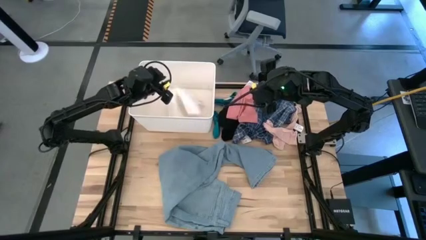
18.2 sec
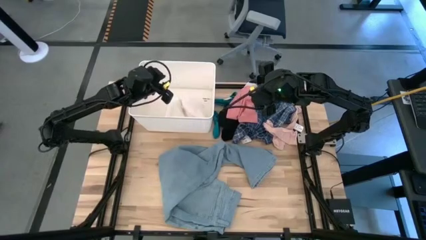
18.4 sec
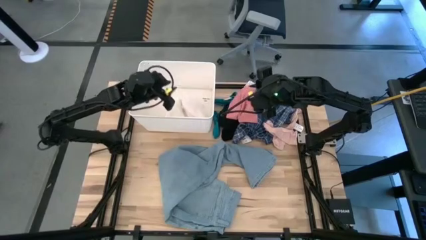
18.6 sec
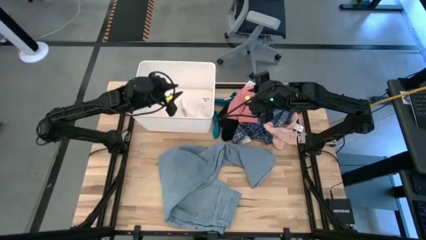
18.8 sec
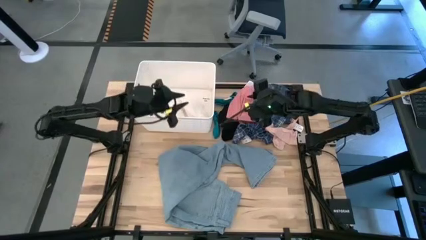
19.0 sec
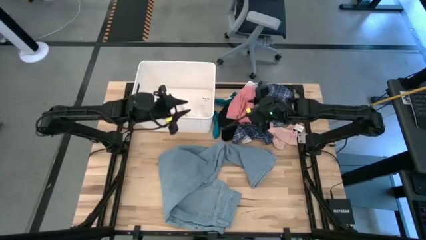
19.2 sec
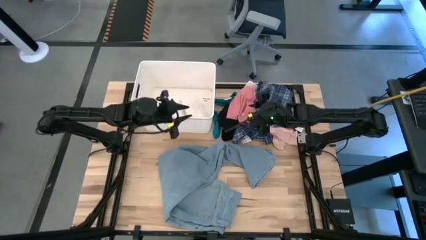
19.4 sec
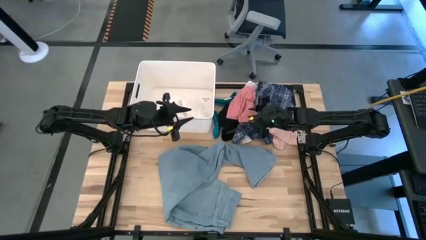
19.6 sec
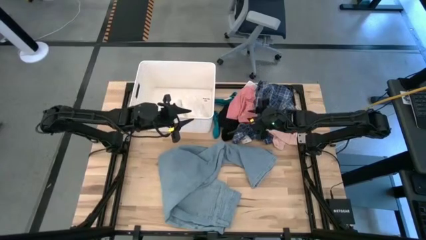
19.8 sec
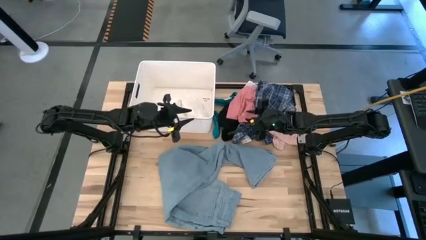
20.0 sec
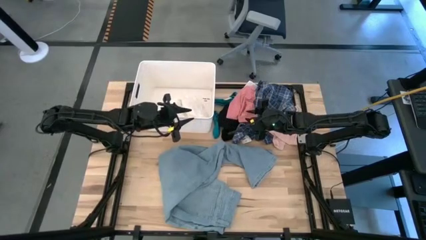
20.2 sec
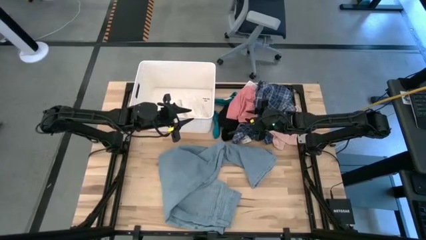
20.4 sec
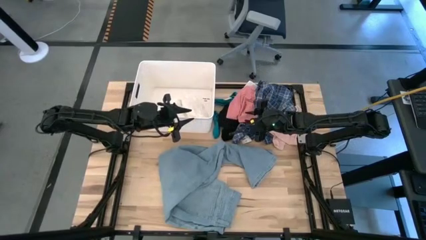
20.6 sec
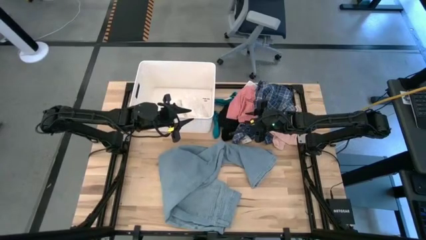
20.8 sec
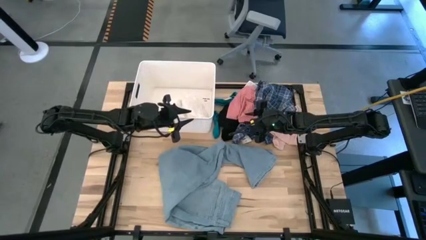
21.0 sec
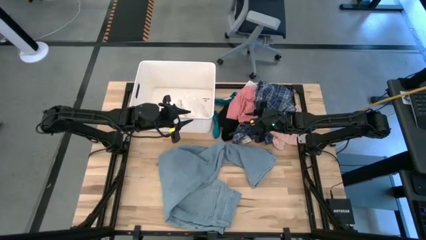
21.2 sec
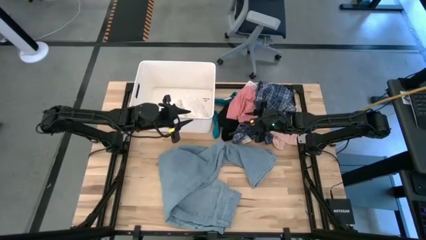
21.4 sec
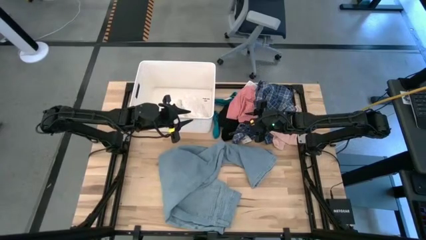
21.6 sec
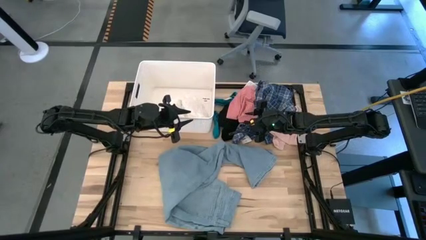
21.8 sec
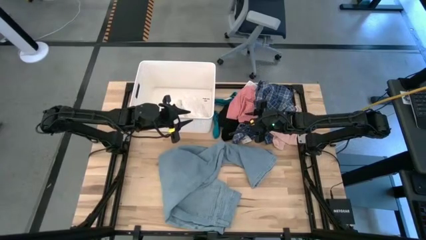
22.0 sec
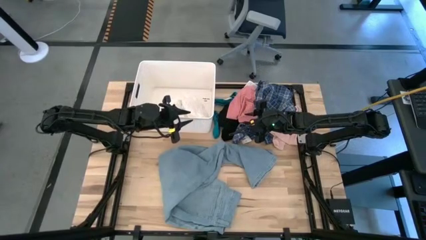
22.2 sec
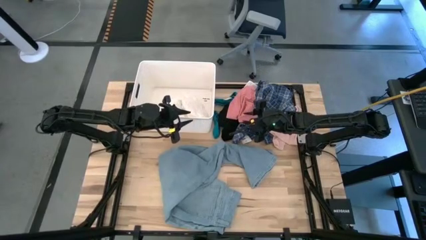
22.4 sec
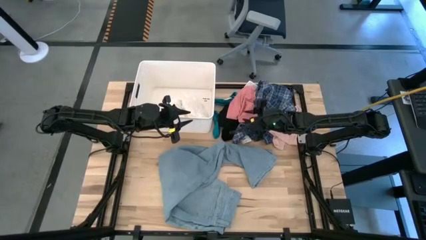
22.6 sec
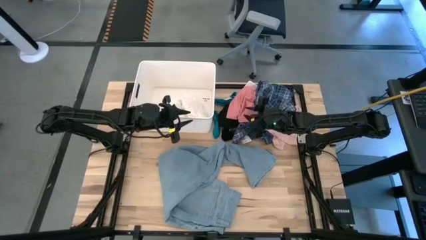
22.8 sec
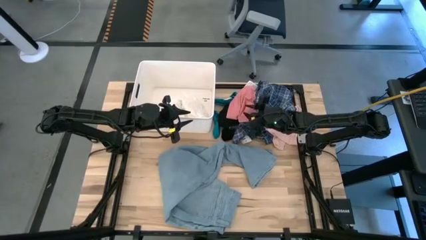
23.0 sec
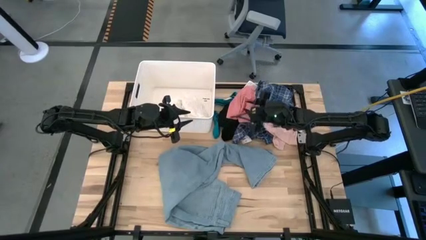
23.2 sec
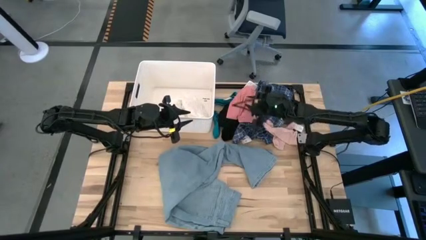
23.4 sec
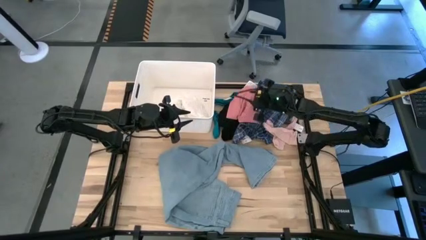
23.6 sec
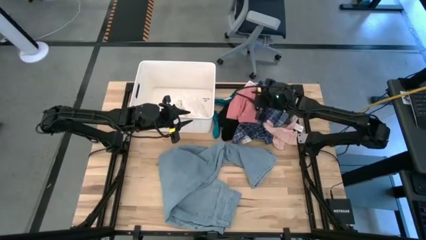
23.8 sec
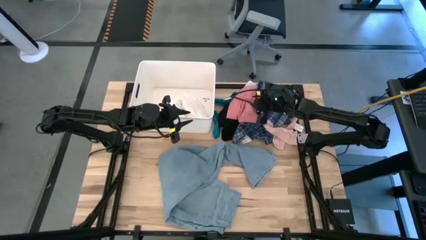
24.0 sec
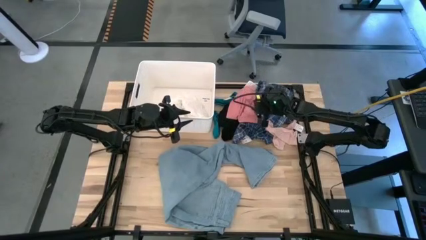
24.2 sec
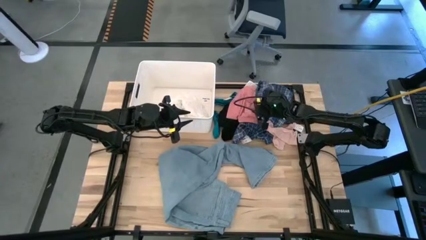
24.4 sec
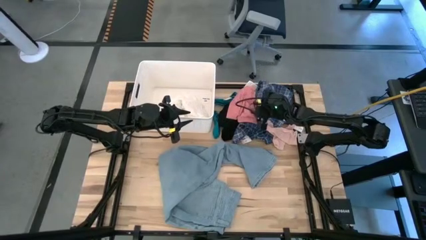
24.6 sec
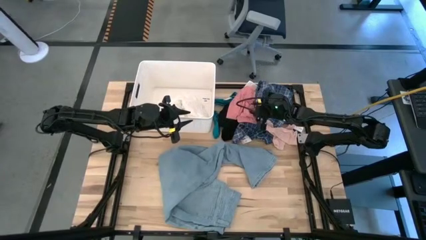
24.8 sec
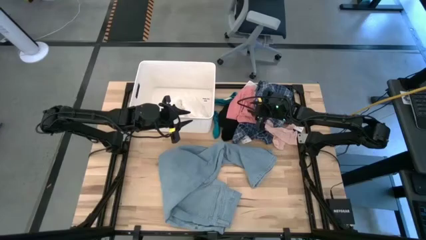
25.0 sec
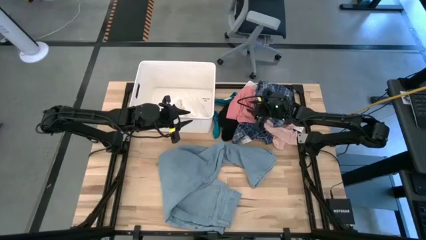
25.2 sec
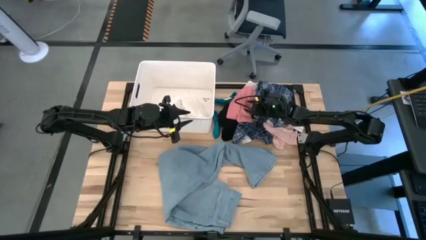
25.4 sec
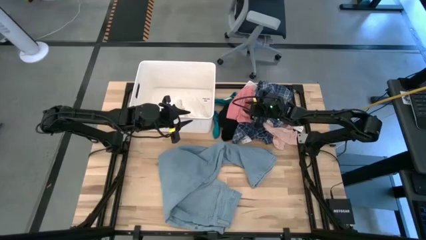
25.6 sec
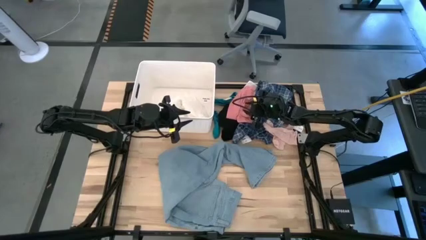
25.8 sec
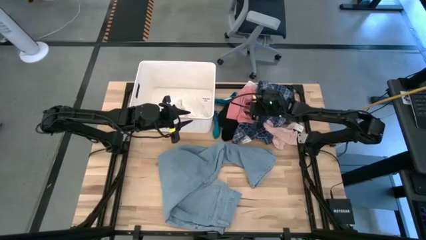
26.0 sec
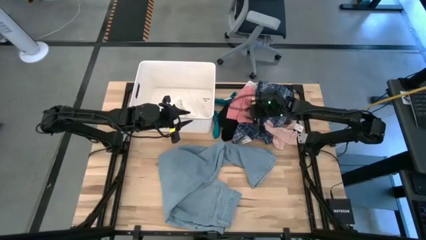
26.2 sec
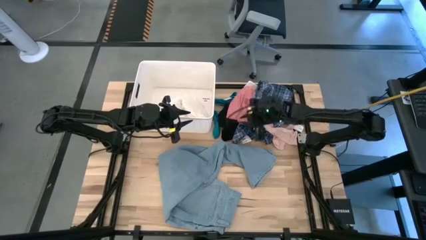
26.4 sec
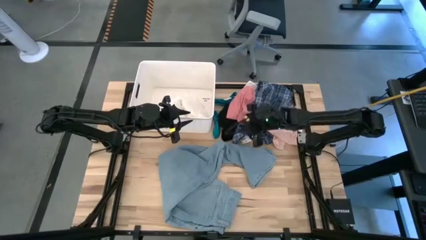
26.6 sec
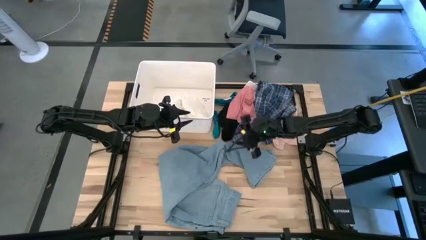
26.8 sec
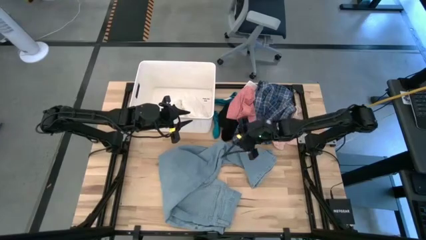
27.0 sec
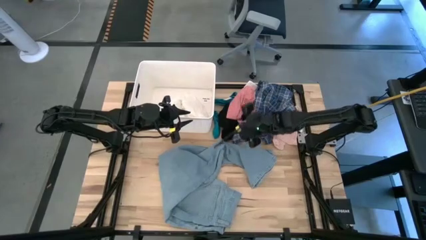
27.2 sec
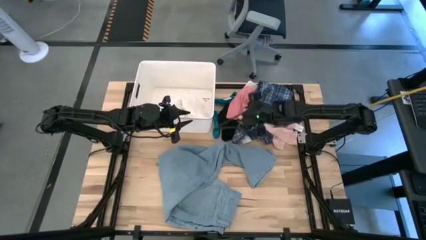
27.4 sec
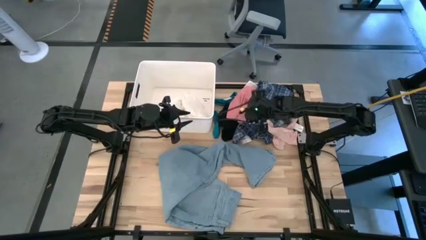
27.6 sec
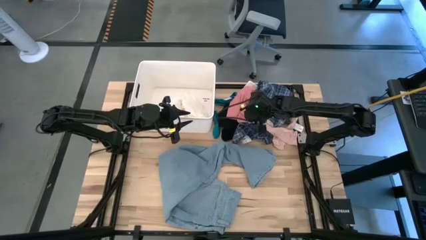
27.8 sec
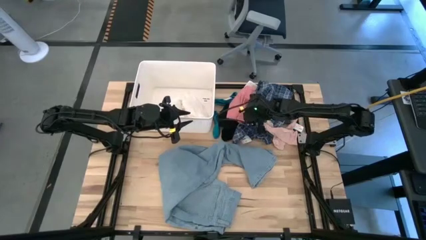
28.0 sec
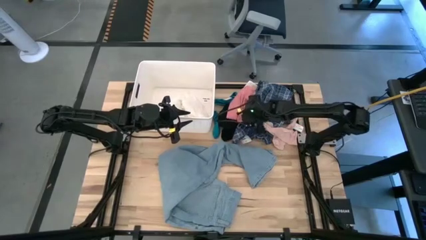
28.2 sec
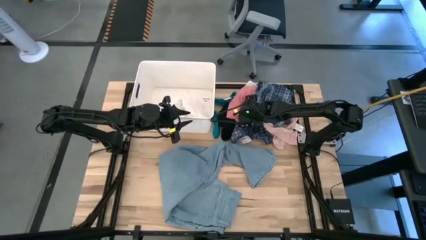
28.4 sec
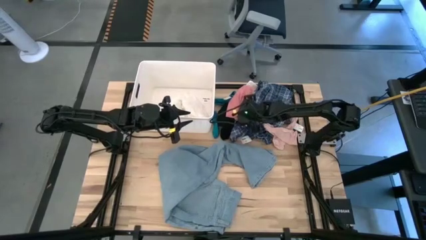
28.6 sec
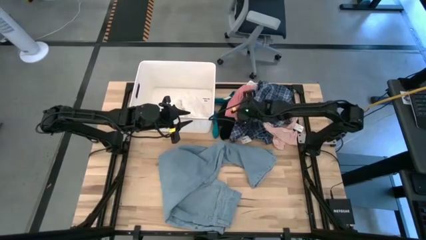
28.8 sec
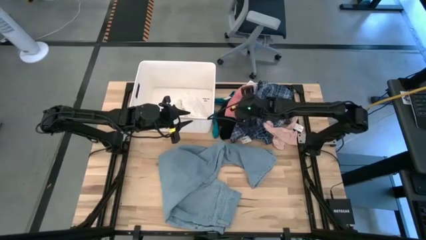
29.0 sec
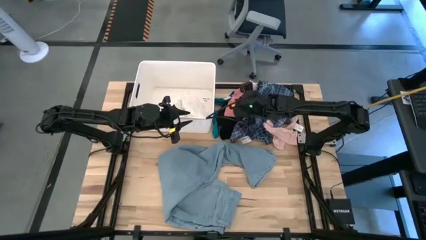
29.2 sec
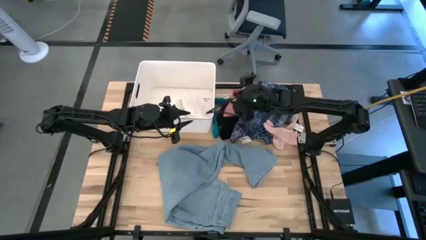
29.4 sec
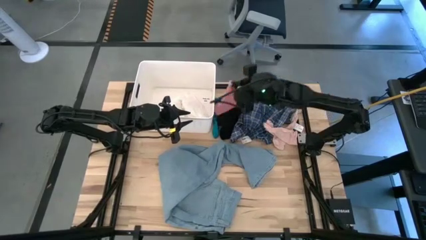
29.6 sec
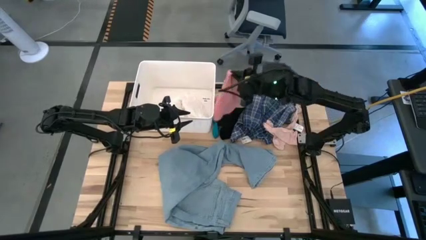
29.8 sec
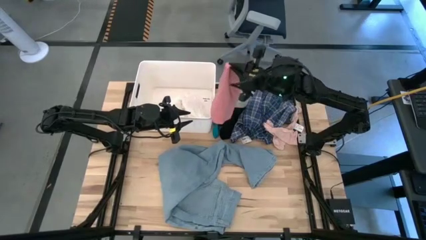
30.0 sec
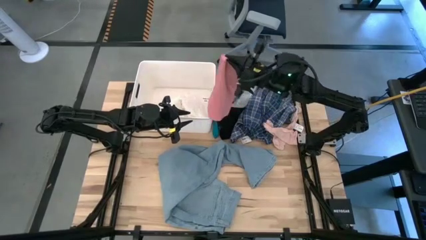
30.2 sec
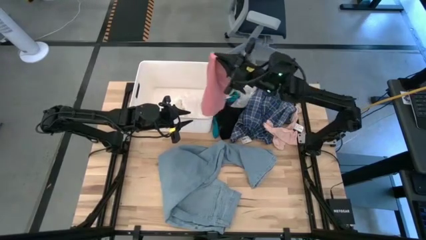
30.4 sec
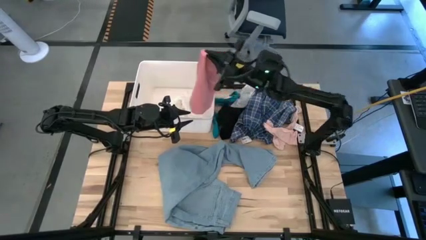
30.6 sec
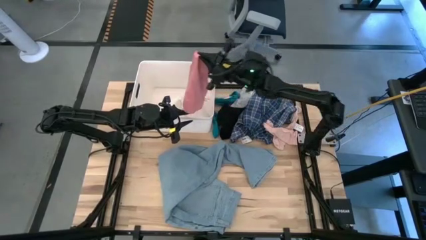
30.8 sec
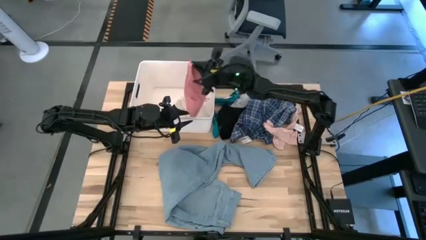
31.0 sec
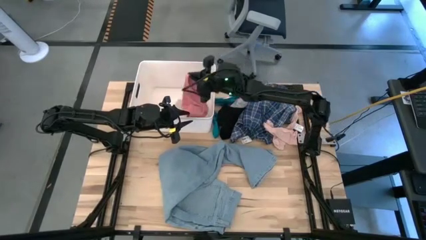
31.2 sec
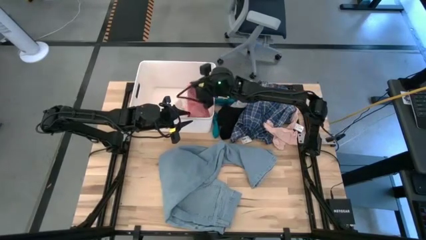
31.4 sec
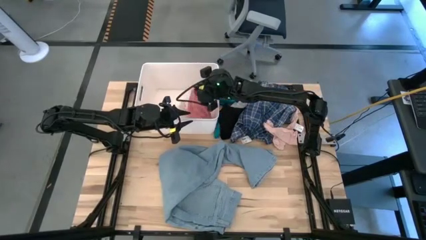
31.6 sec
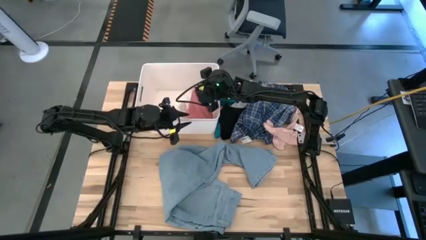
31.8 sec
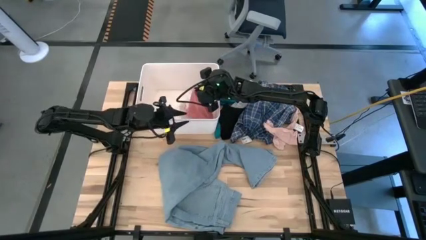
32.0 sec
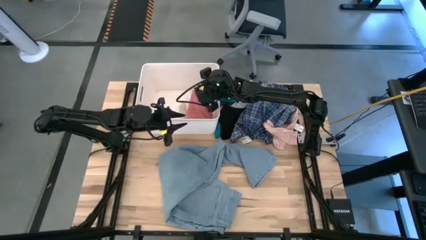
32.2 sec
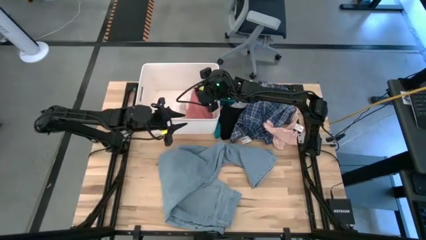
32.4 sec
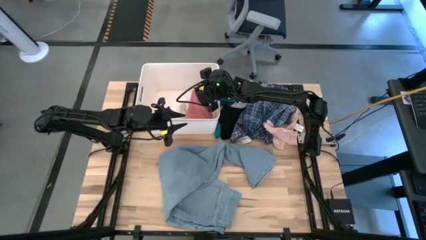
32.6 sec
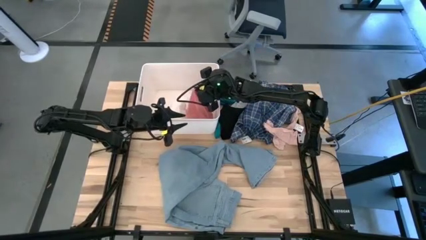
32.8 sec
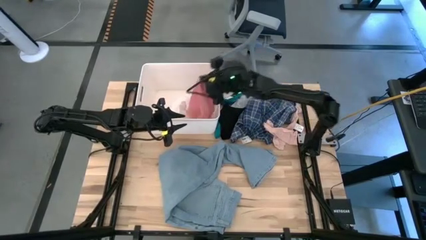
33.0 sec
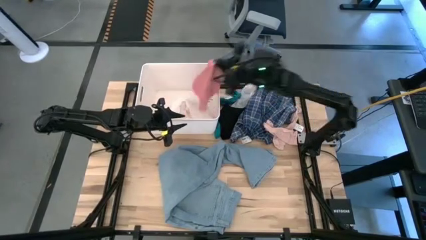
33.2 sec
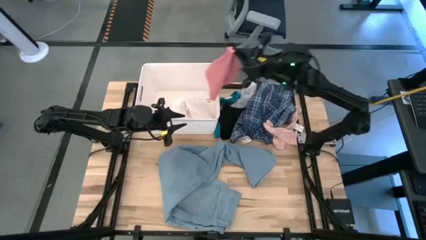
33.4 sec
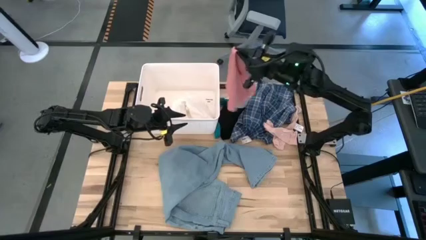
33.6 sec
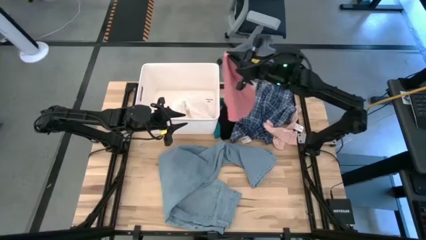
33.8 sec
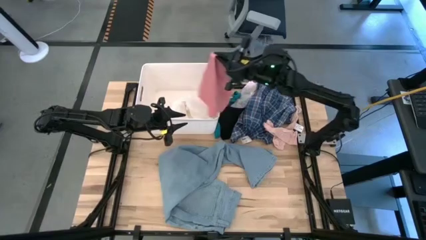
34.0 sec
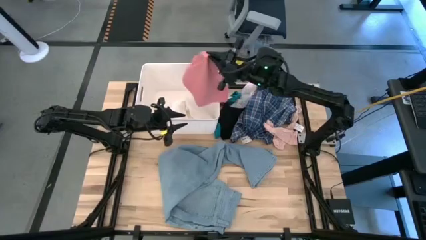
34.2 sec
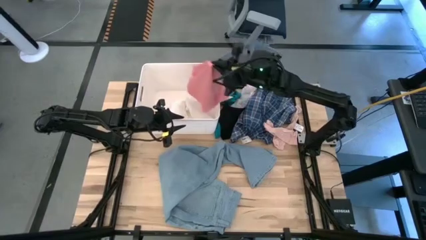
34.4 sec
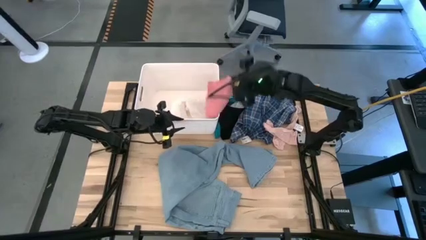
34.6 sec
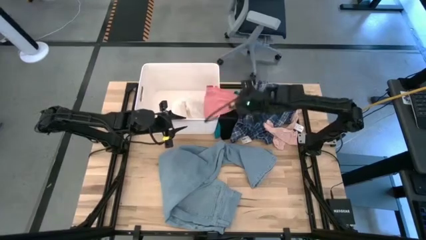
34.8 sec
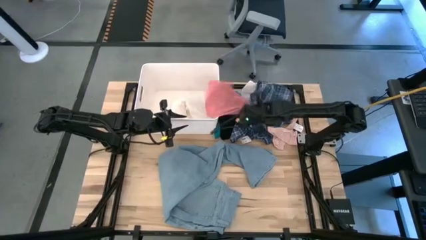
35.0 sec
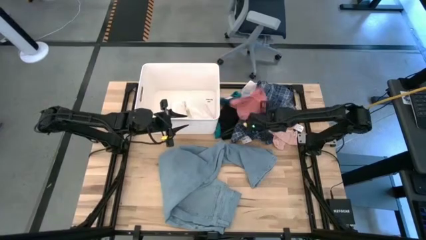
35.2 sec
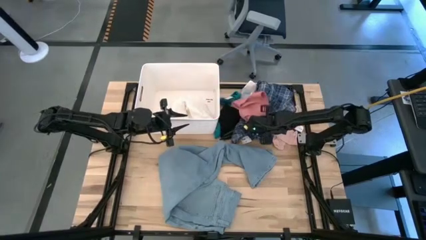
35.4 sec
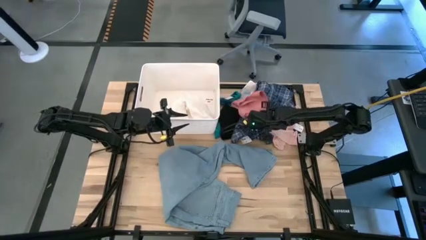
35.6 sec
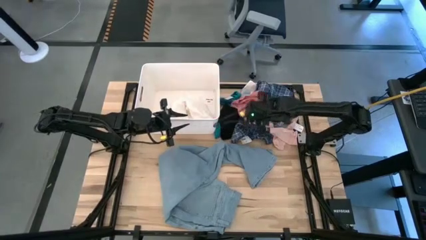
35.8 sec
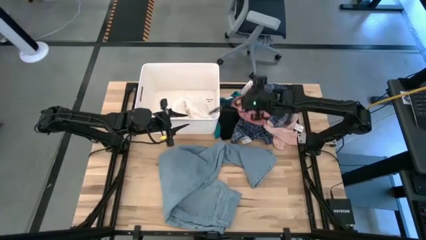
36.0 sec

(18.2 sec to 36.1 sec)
Task: Sort clothes
Put the pink shorts into the white bin
